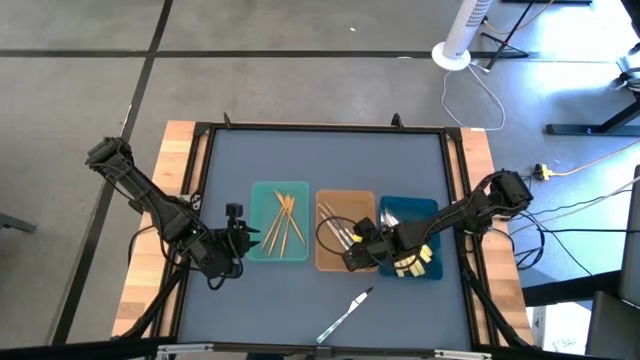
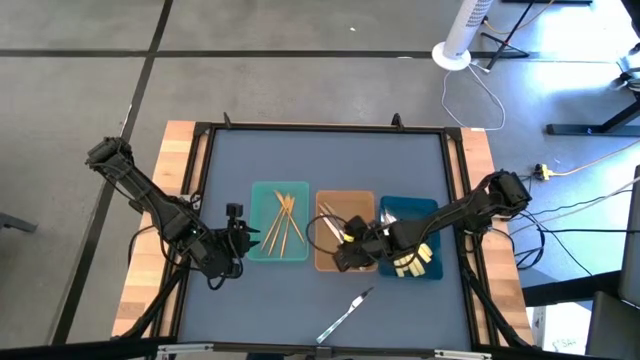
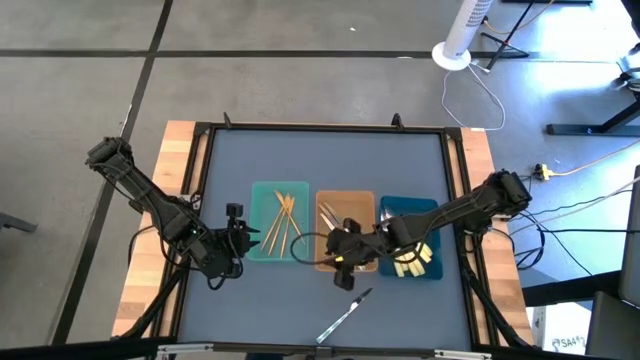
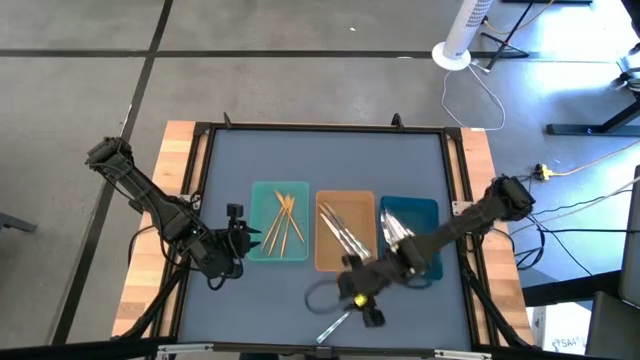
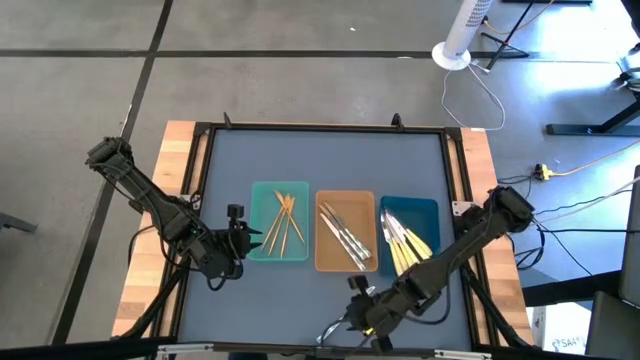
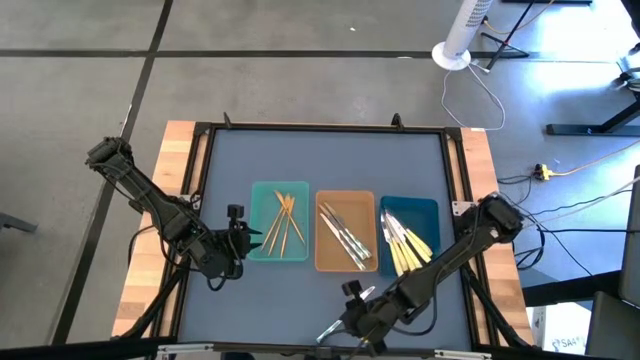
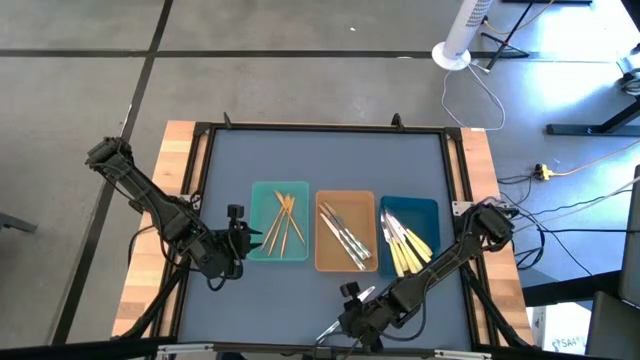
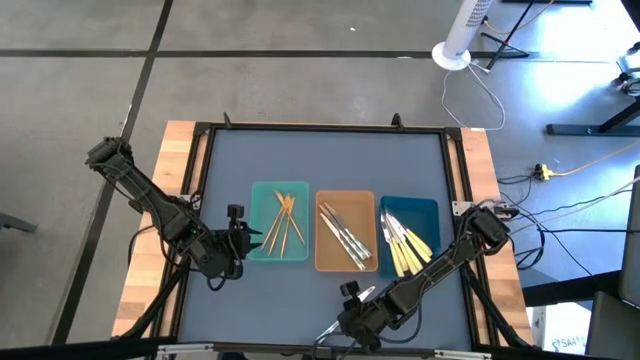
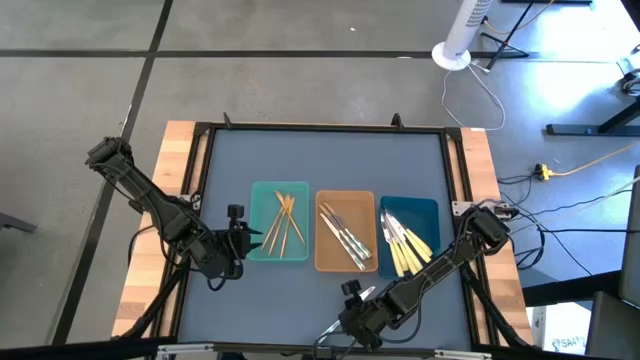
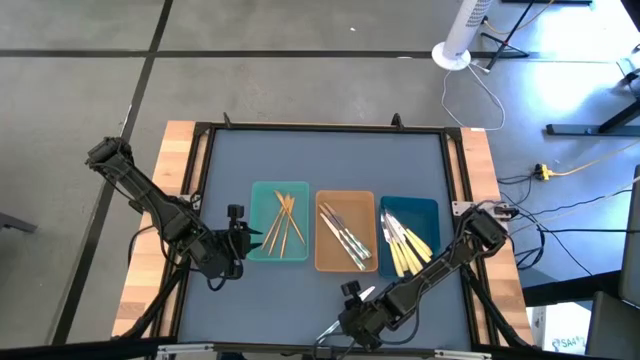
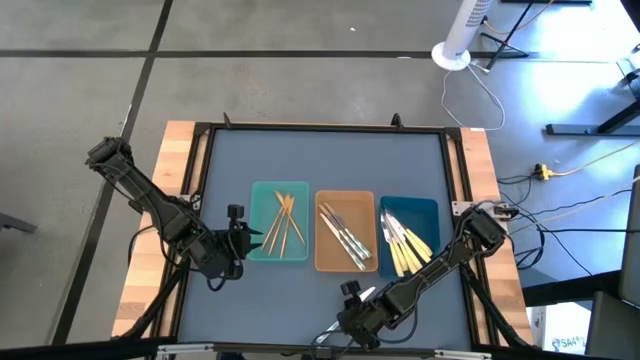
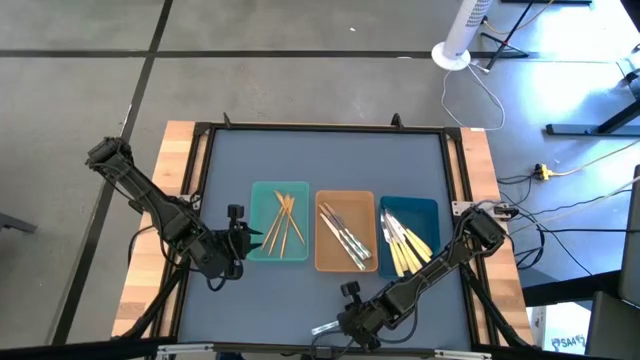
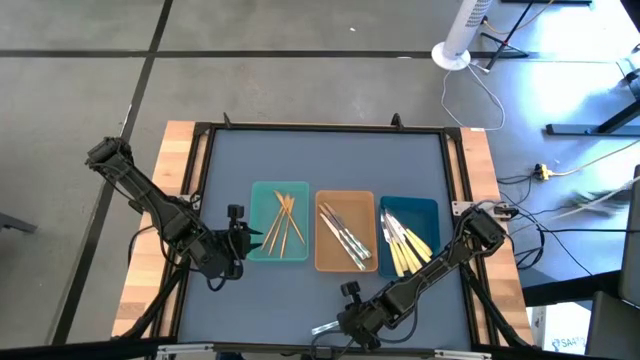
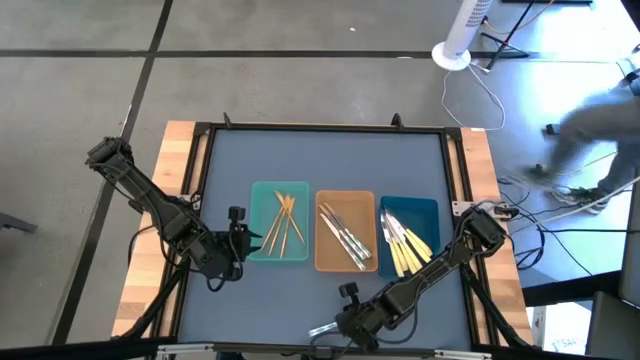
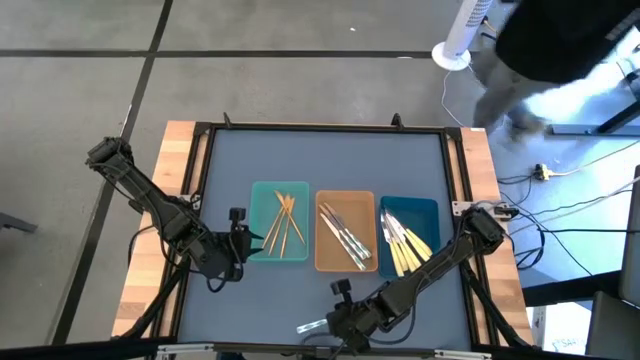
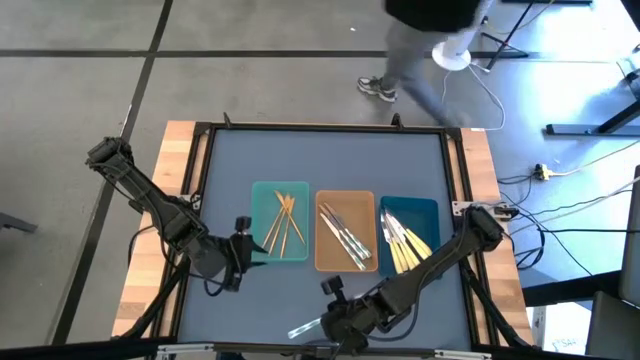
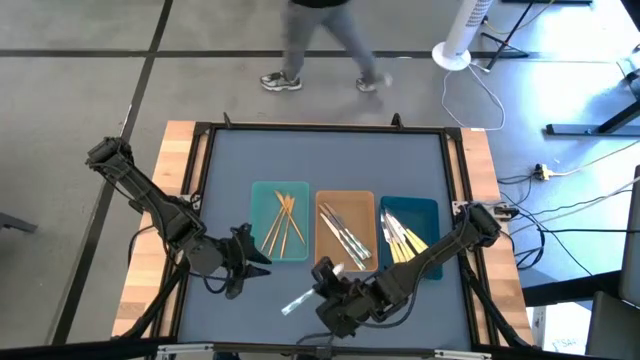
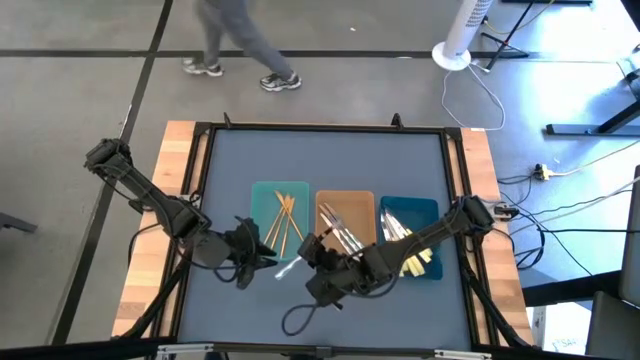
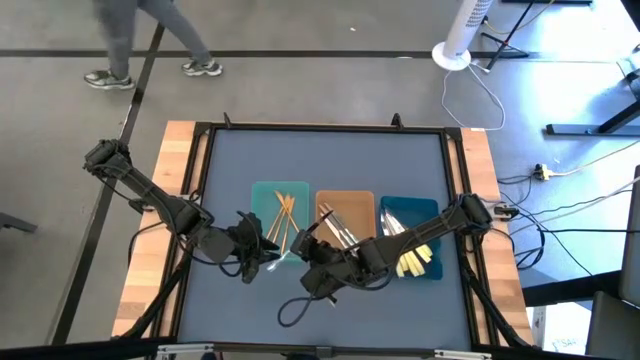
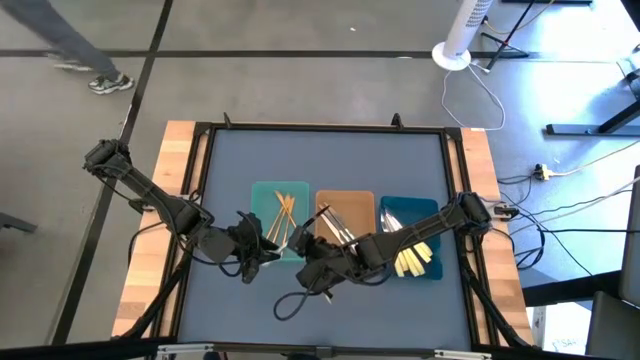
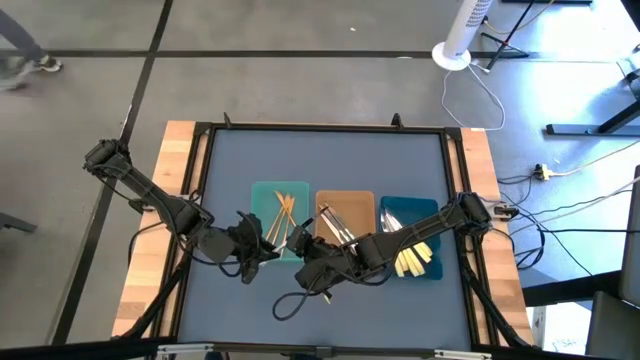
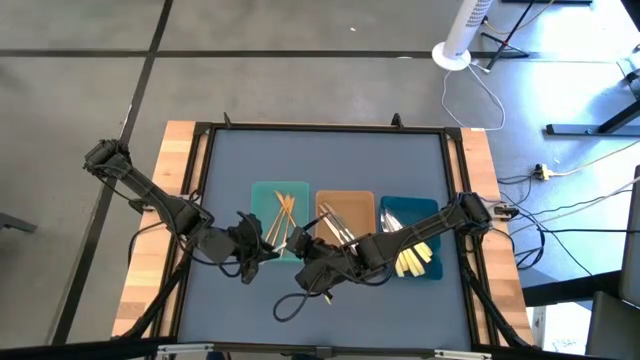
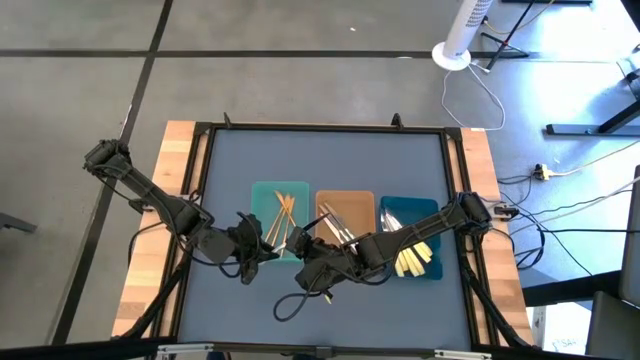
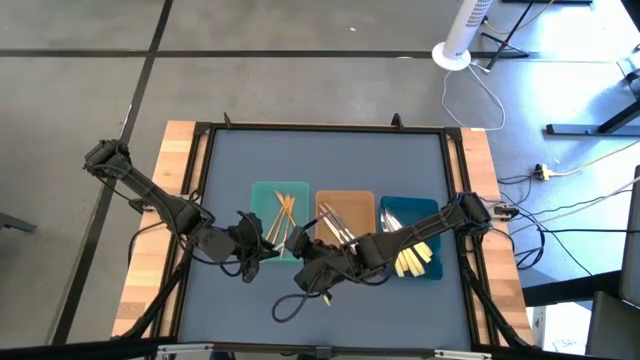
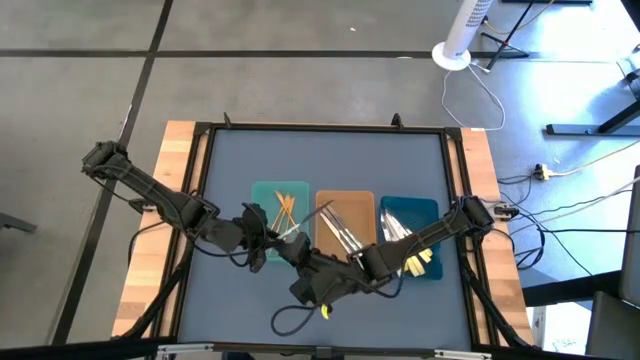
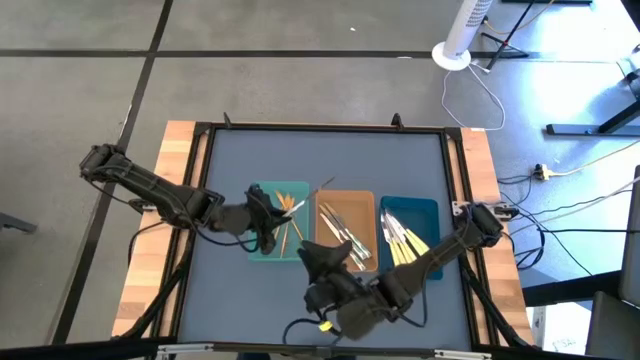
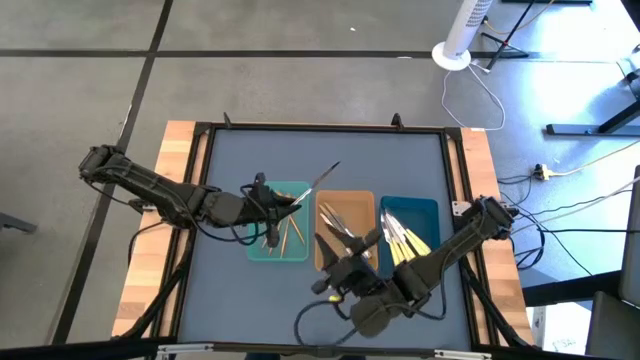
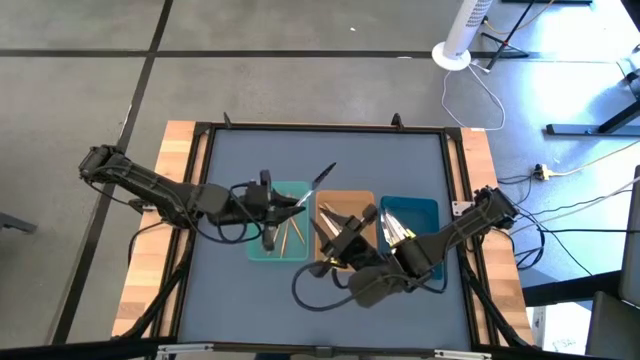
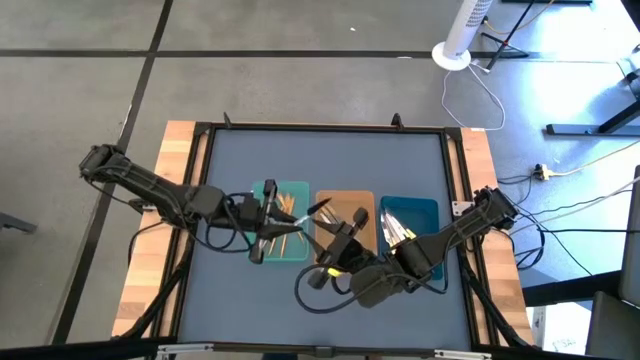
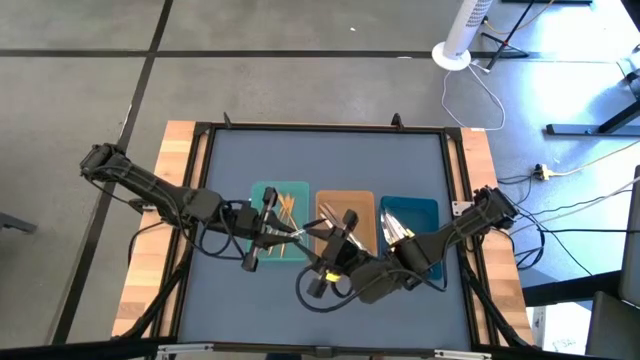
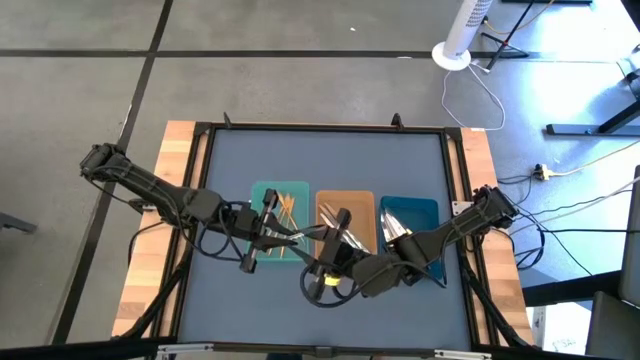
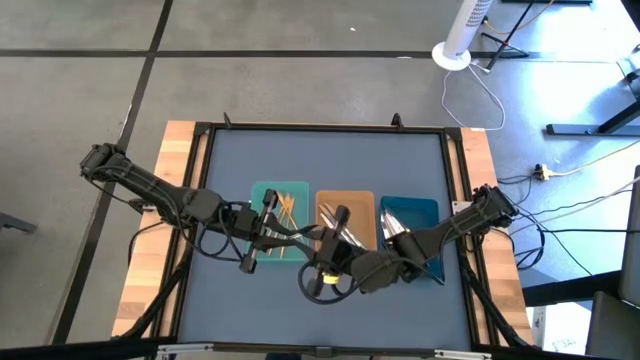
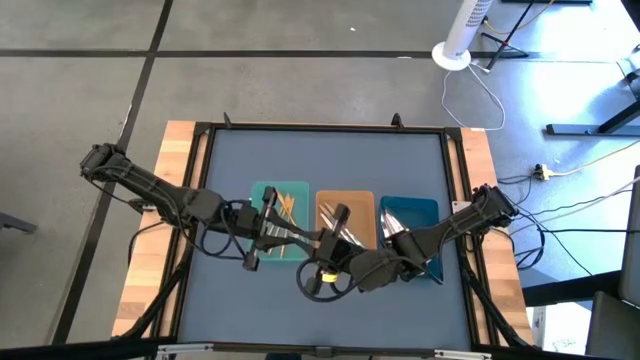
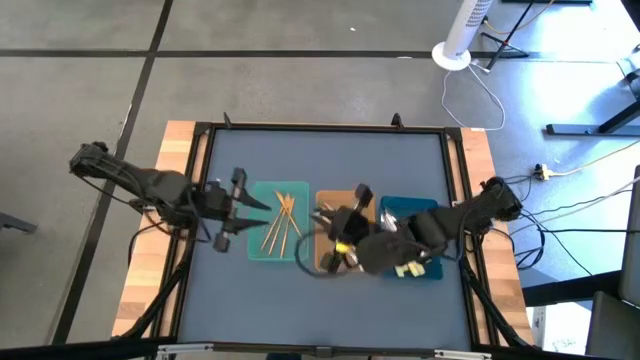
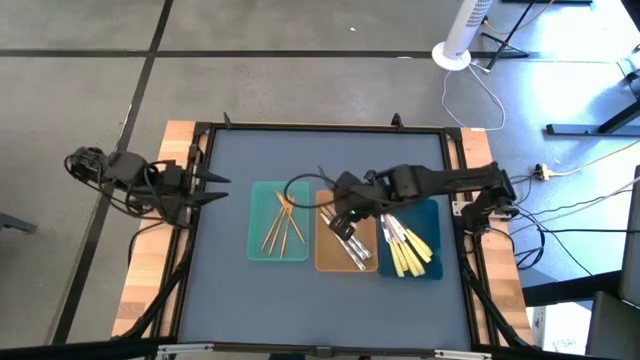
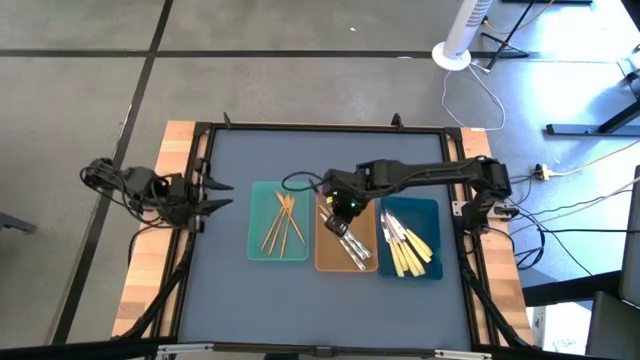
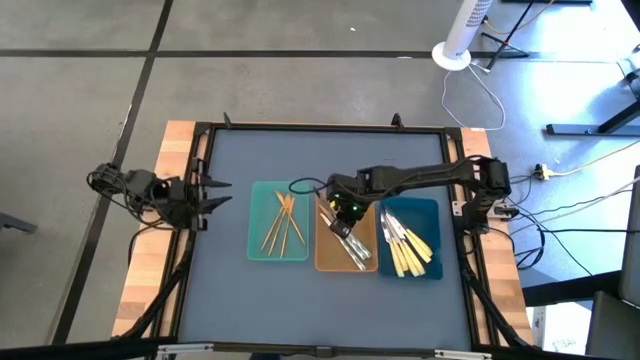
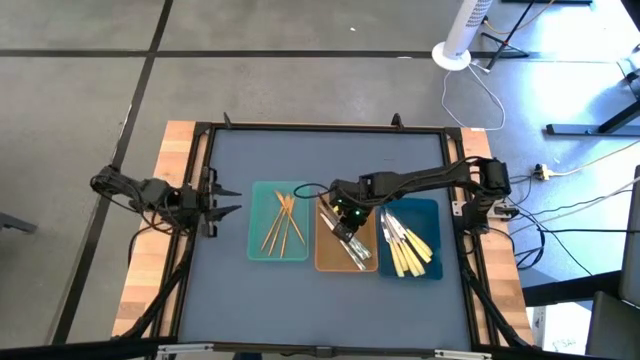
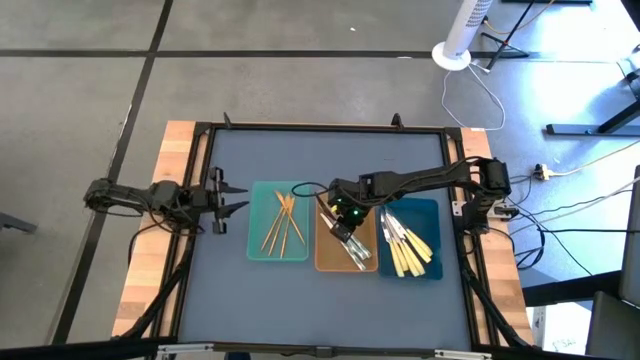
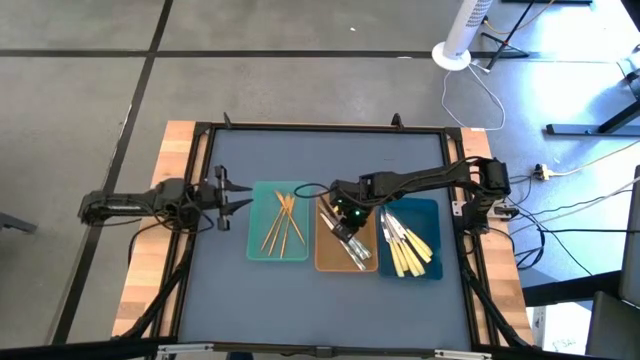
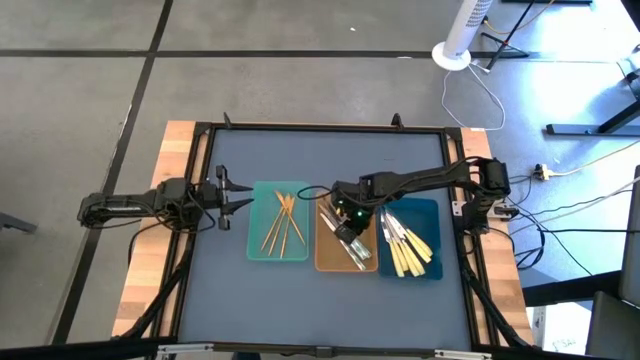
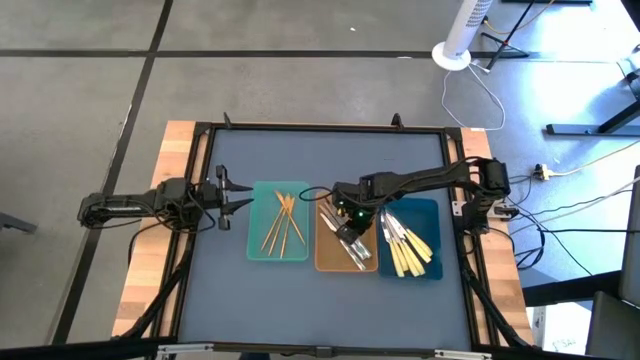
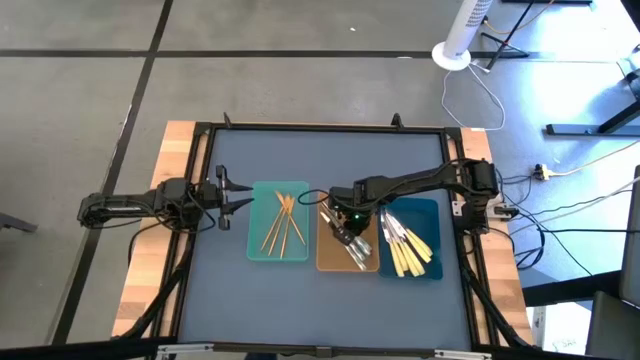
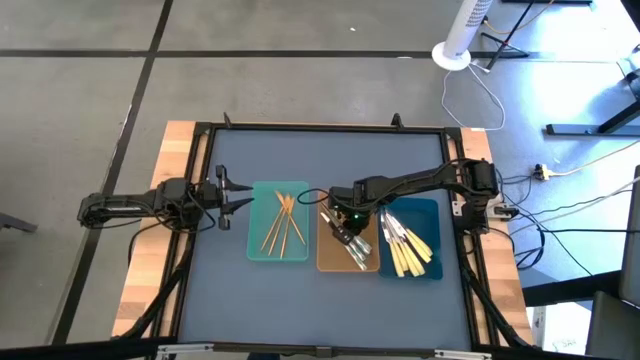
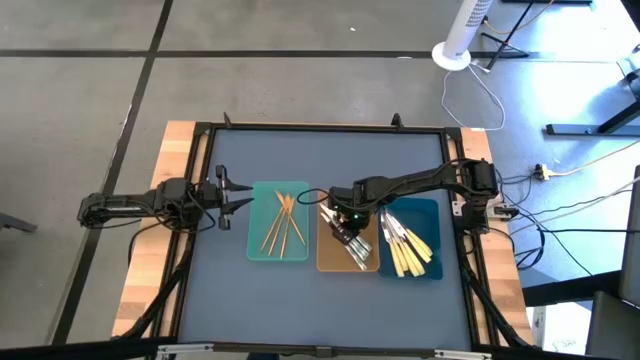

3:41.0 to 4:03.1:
Task: Sort silverware by color (type)
Put the blue knife into the orange bin
